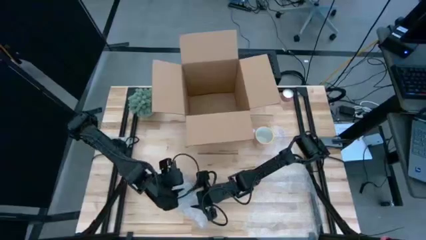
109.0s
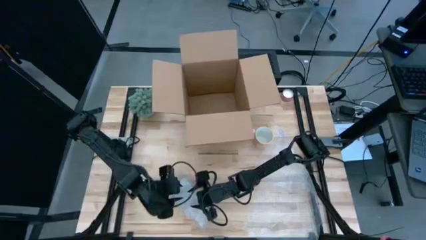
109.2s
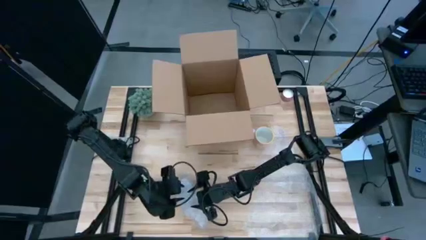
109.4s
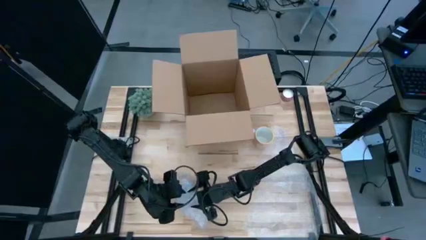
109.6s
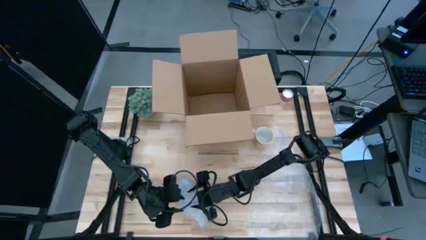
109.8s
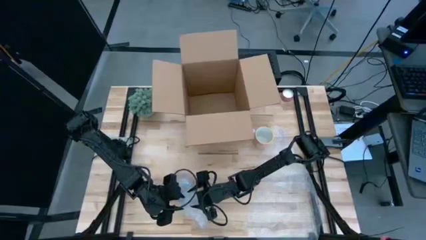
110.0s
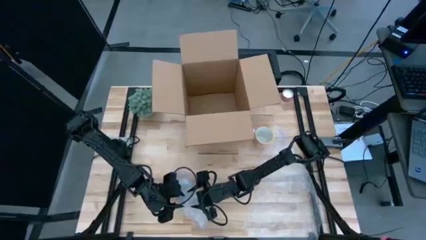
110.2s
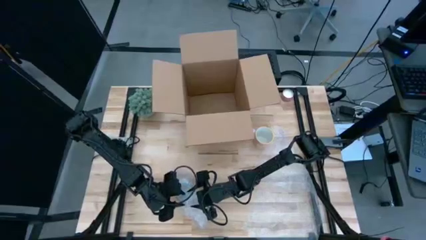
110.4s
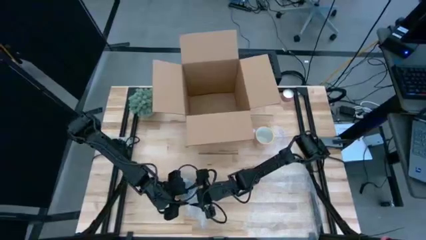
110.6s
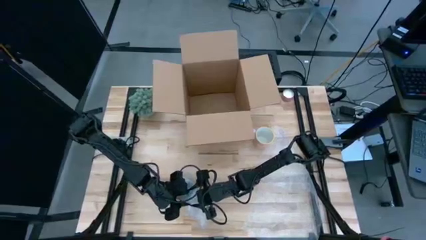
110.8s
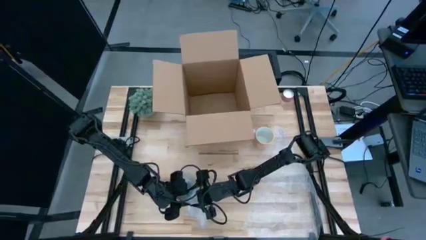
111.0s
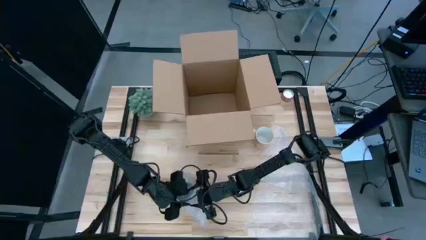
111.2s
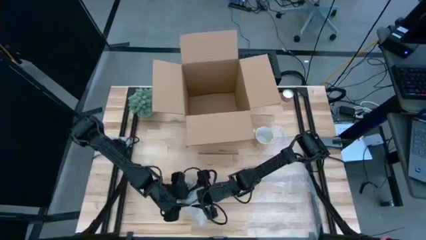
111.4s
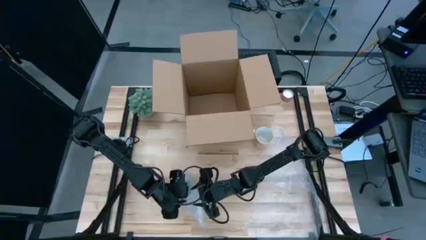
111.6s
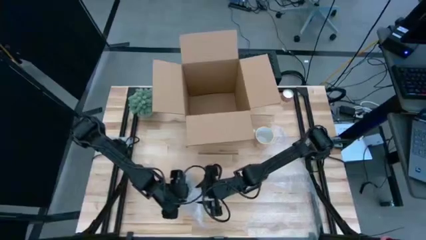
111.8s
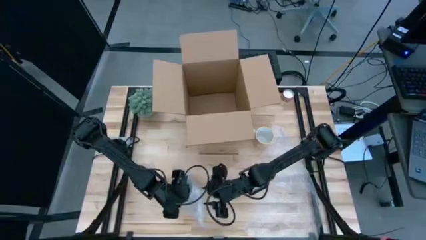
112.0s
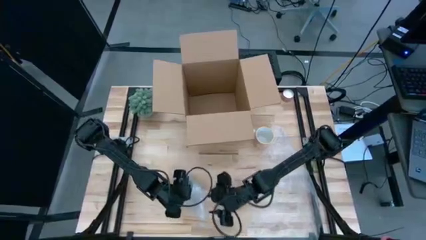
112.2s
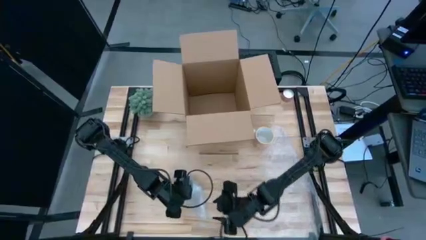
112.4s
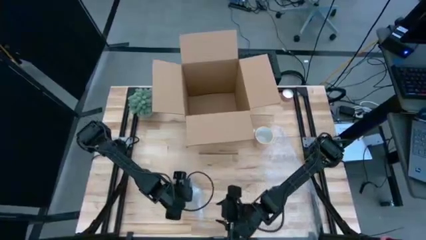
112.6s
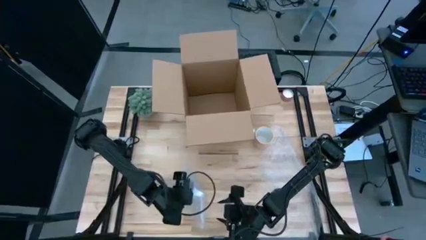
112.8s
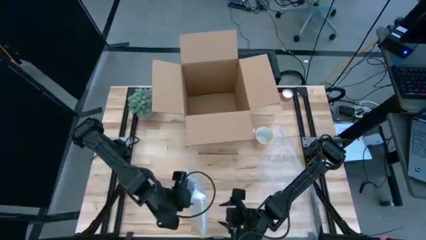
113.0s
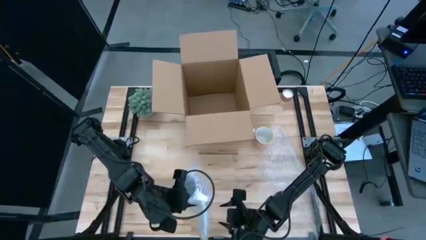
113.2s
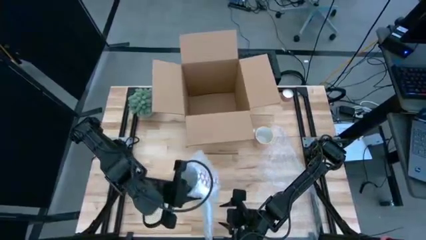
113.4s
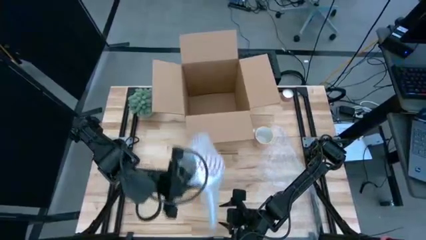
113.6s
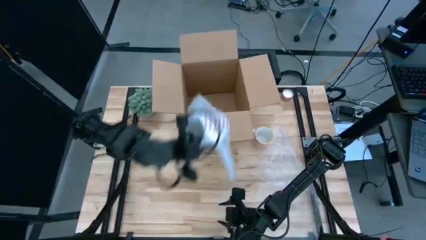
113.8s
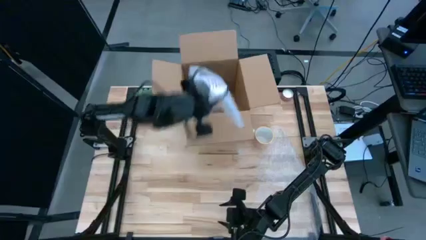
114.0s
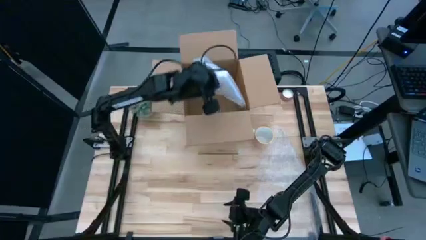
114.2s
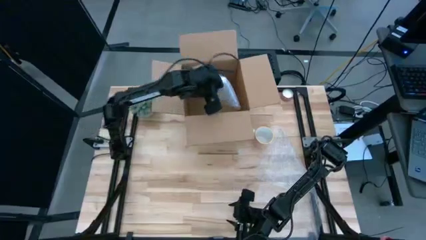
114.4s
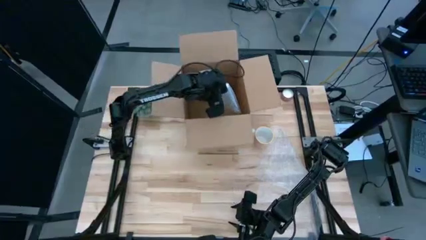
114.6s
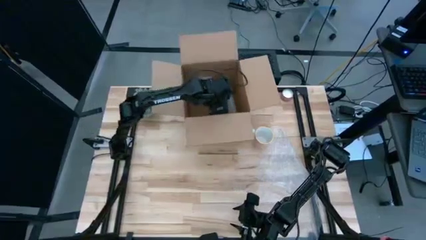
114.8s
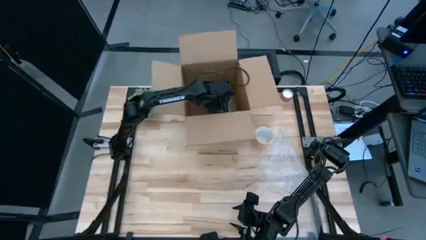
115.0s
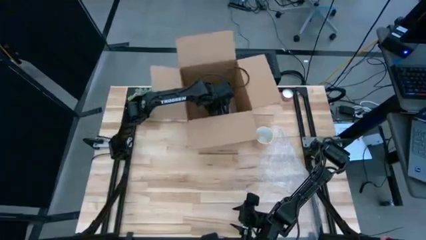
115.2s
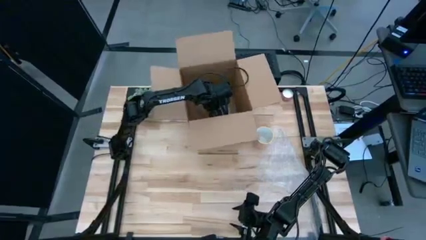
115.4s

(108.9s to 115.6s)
Task: wrap mug
Put the wrapped red cup into the cardboard box

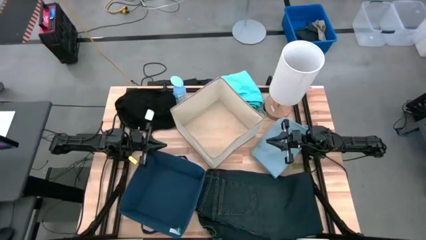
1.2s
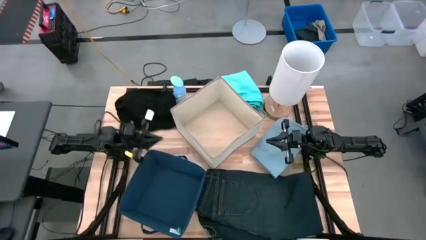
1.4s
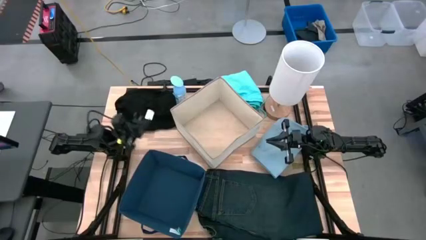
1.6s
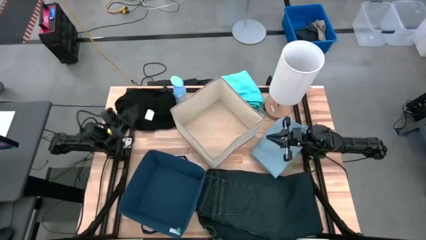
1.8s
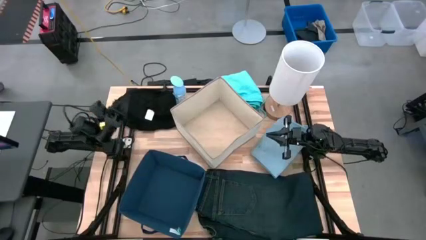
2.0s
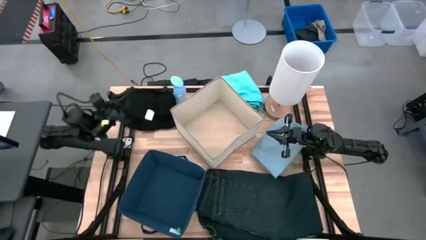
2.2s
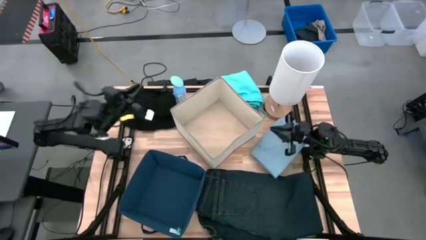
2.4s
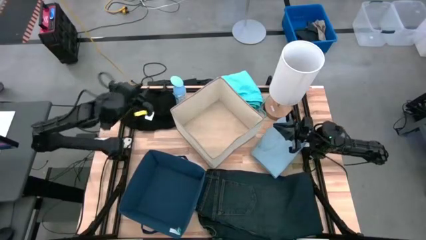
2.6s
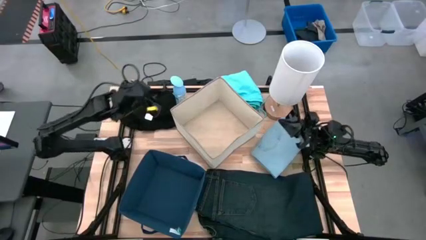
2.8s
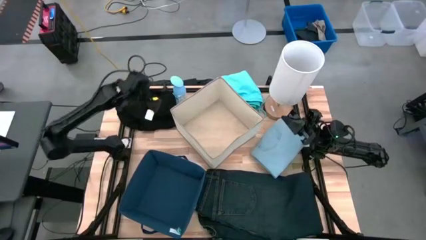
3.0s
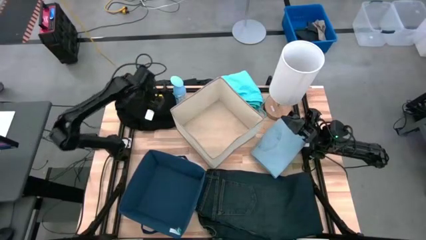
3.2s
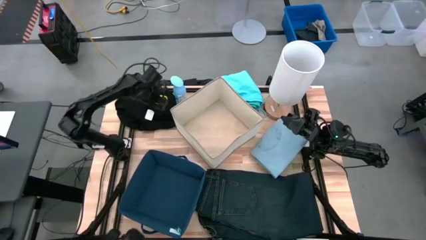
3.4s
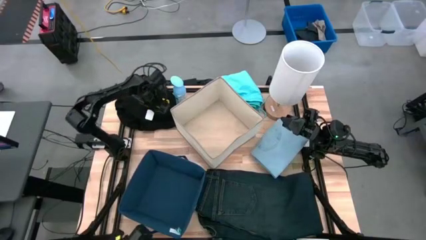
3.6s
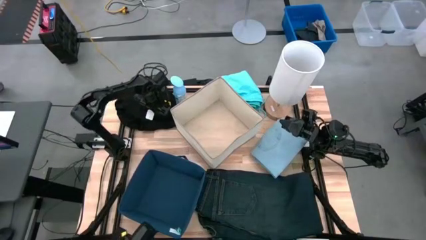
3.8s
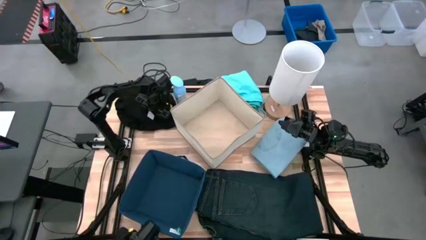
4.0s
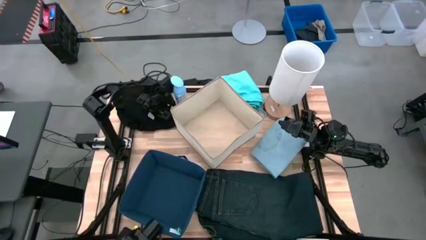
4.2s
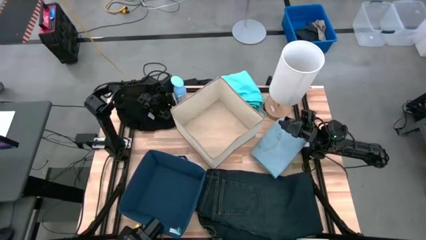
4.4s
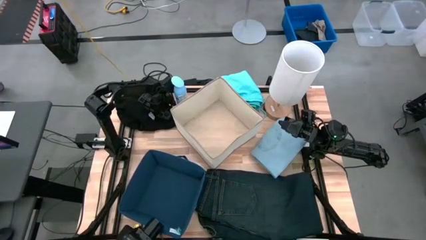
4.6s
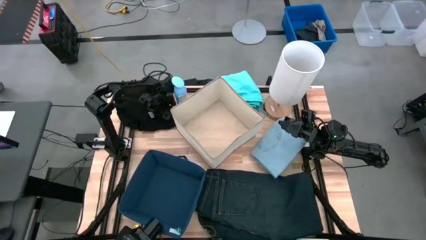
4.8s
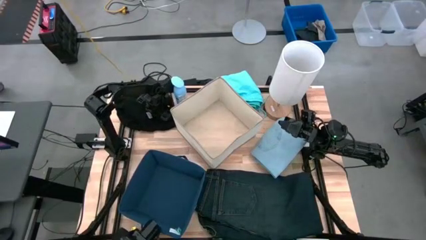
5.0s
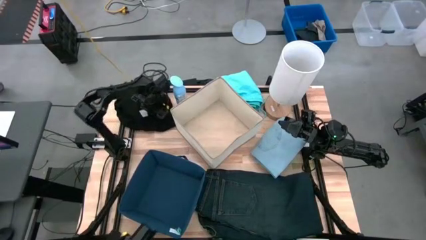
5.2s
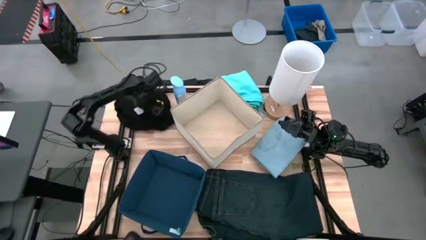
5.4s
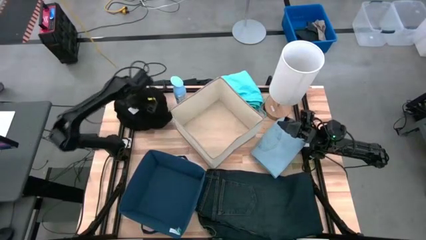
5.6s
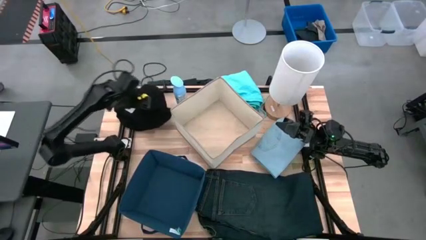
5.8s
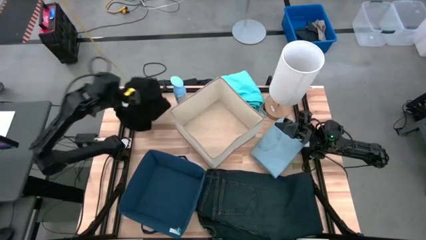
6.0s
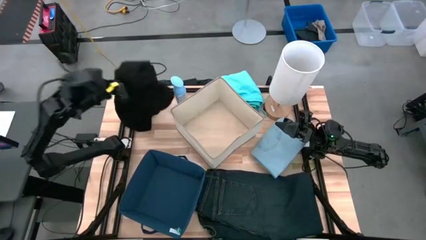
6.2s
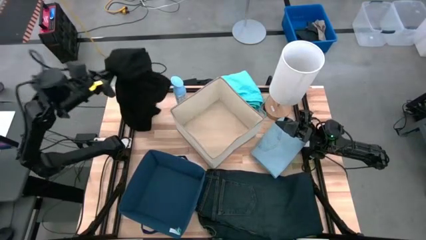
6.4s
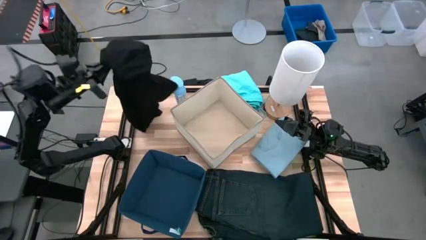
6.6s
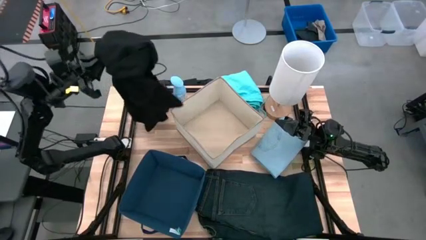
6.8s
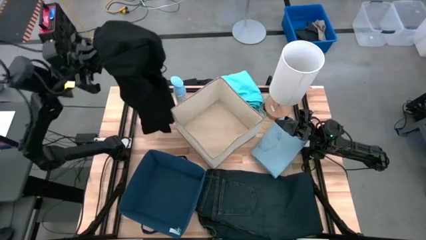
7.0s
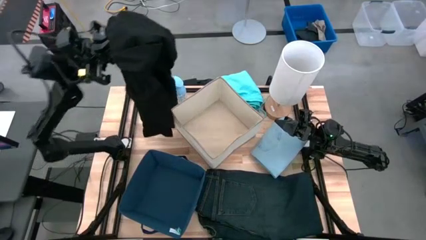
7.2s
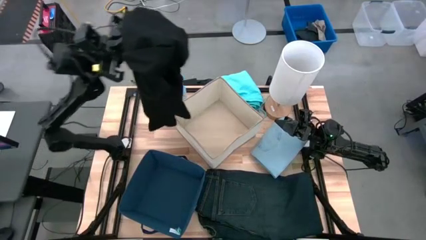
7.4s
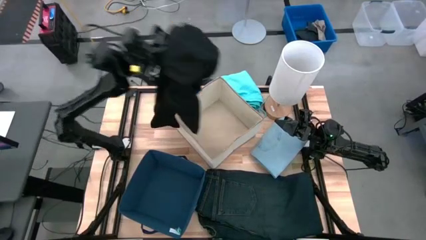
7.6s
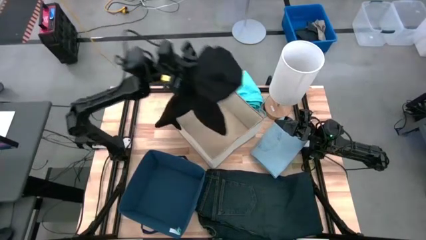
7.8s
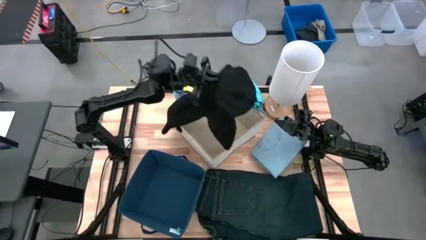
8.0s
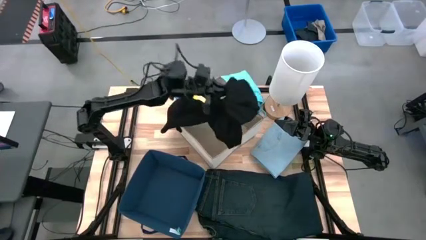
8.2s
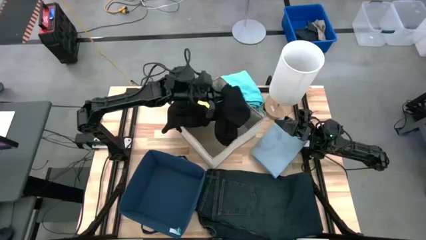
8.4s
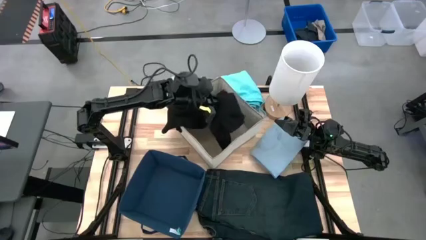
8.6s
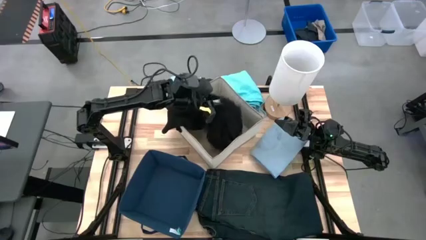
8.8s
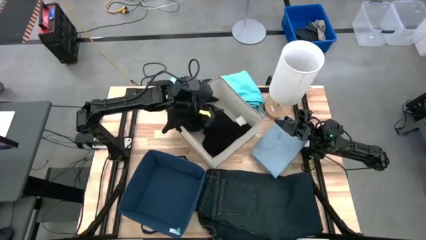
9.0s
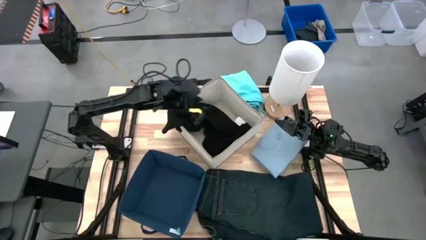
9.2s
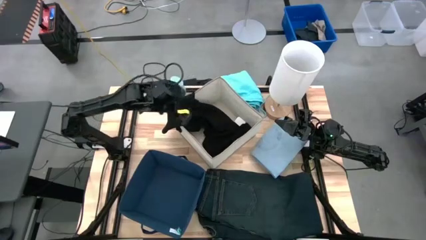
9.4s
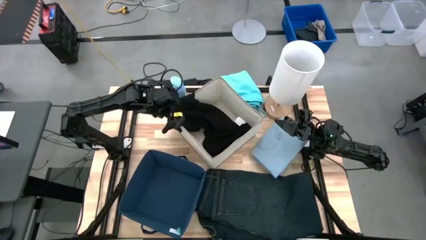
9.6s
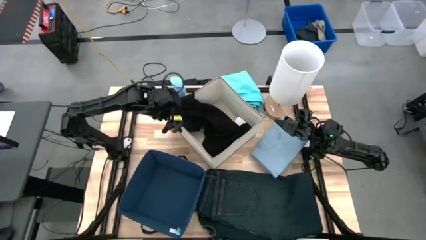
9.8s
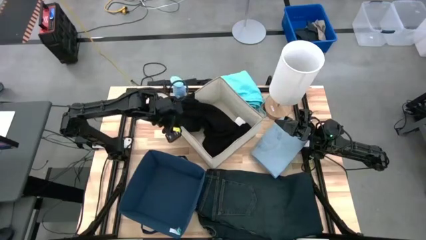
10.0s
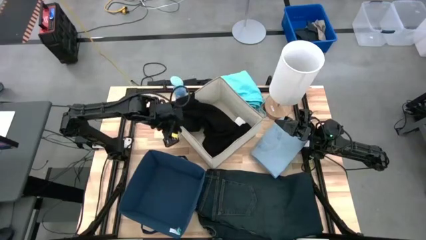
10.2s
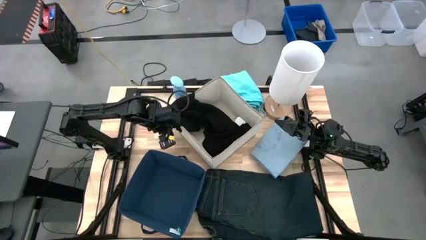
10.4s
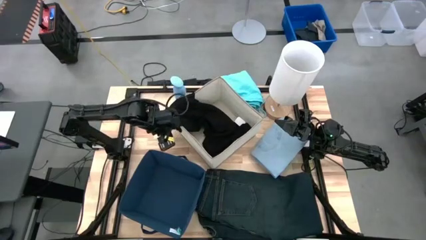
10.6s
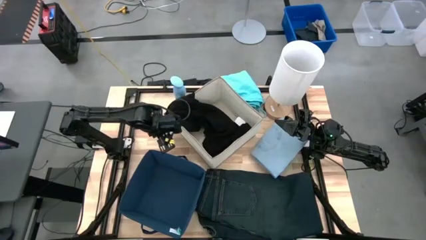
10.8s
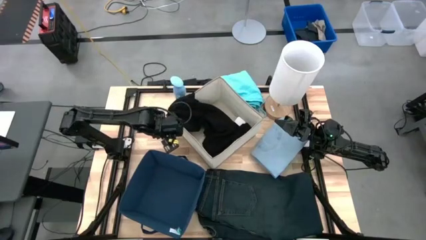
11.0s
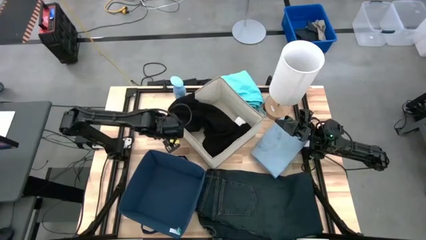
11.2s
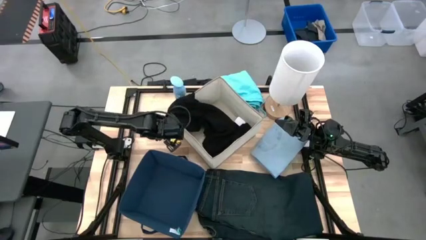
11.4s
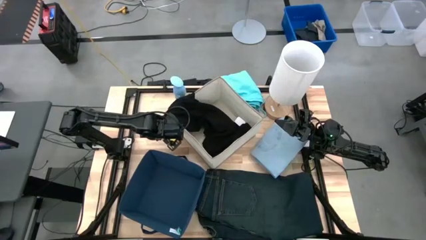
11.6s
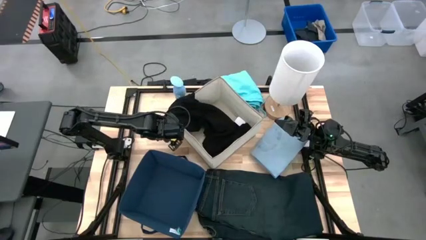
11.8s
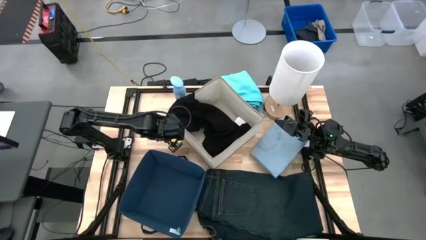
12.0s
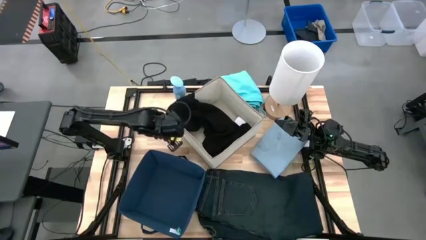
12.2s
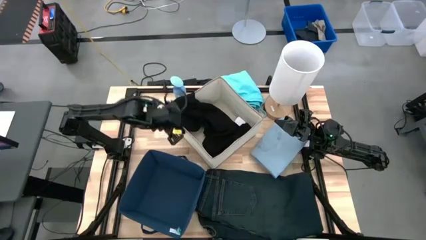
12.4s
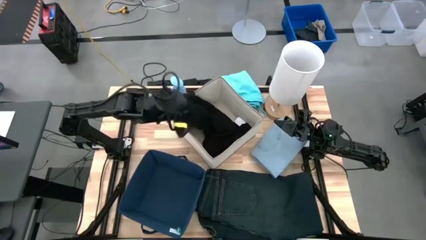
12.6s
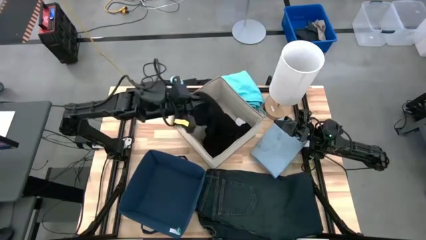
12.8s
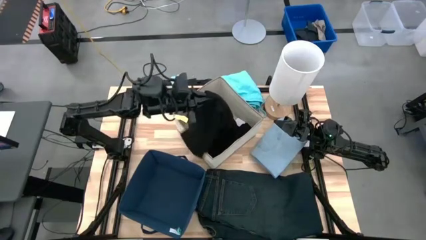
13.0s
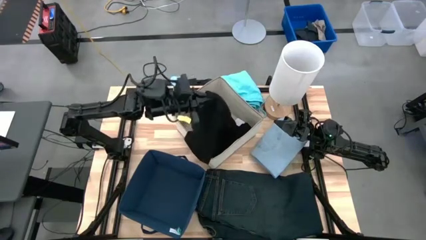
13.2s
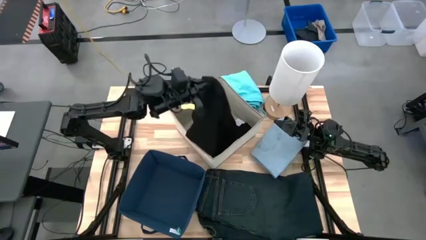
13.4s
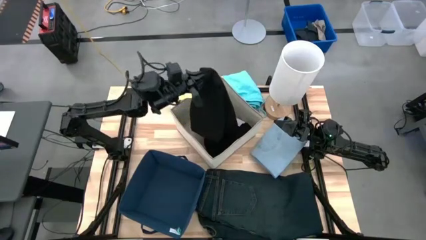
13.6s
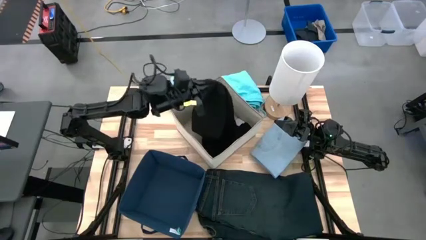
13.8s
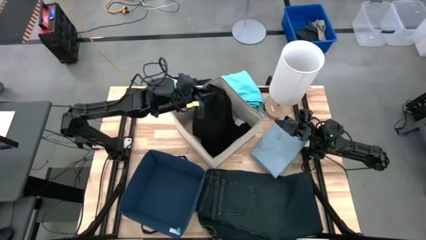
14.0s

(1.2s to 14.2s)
Task: Sort clothes
Put the black shirt into the white laundry organizer
